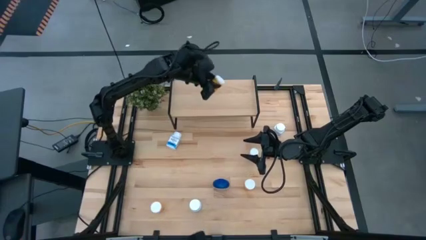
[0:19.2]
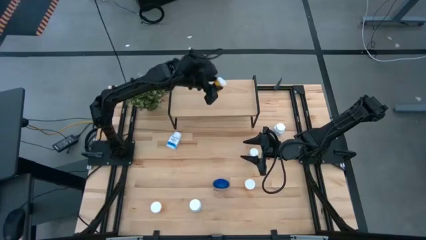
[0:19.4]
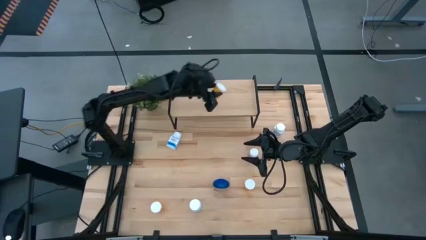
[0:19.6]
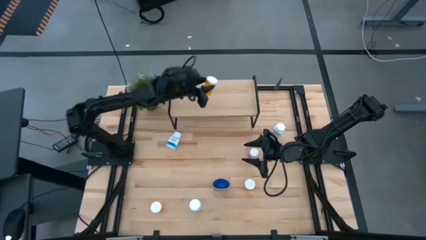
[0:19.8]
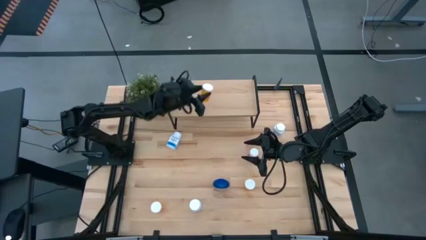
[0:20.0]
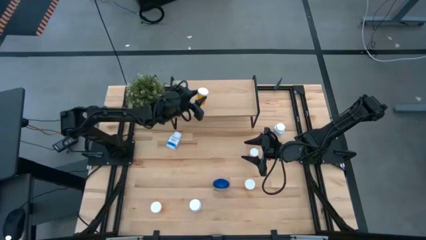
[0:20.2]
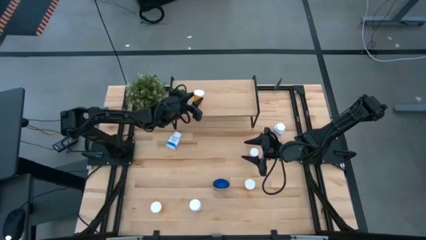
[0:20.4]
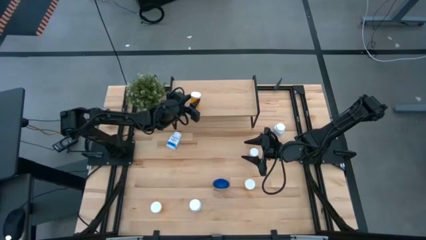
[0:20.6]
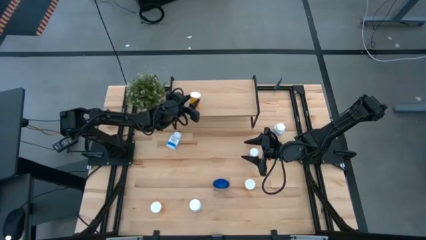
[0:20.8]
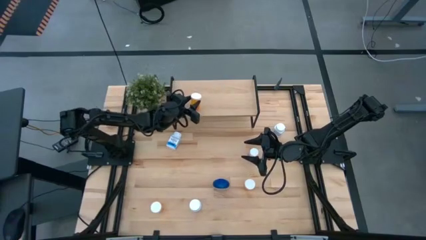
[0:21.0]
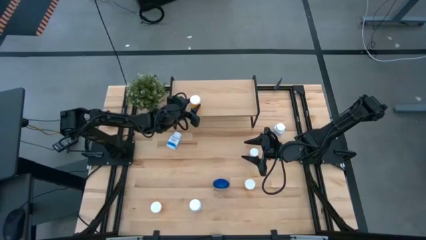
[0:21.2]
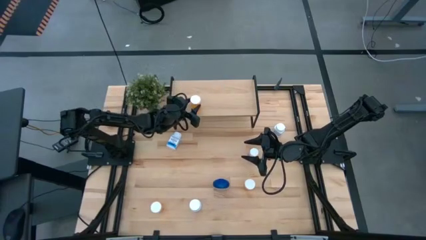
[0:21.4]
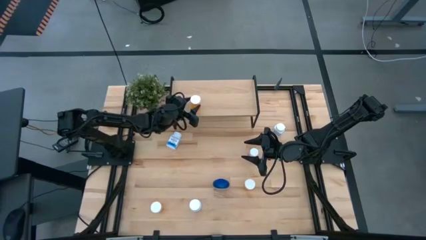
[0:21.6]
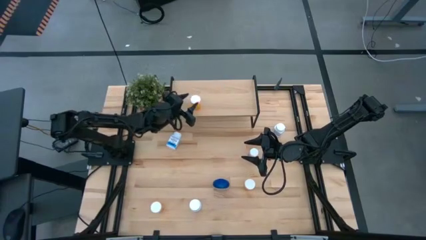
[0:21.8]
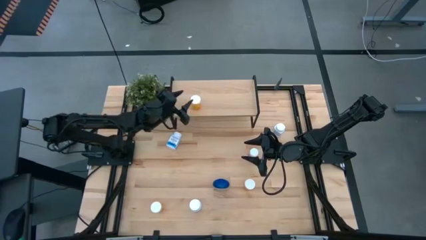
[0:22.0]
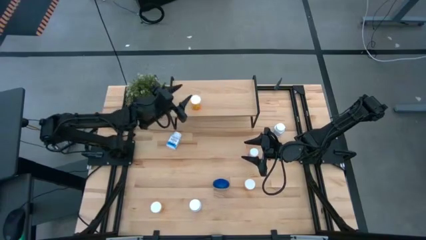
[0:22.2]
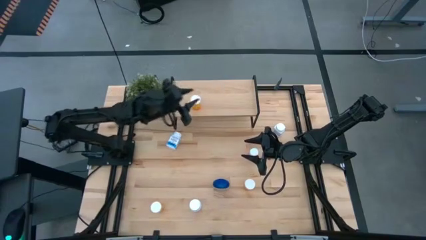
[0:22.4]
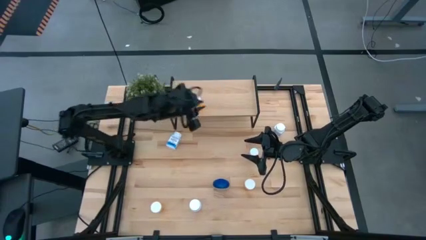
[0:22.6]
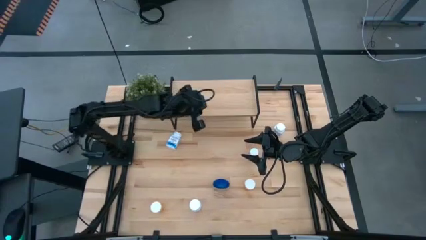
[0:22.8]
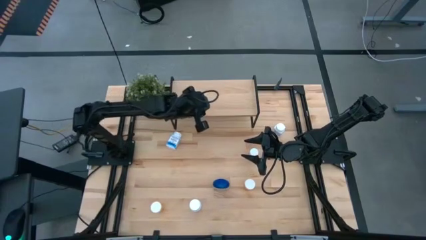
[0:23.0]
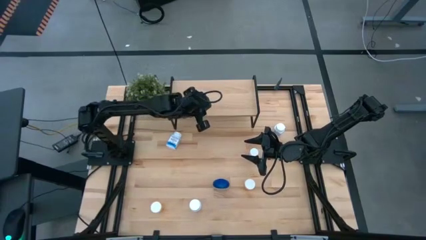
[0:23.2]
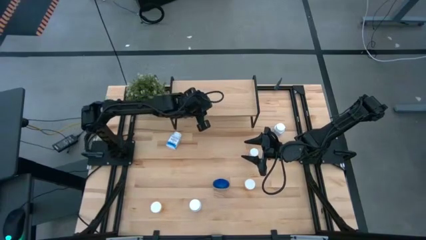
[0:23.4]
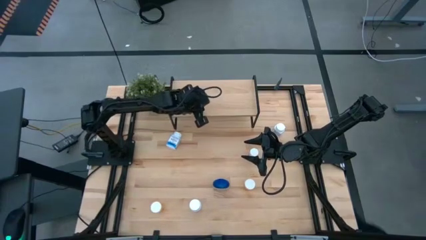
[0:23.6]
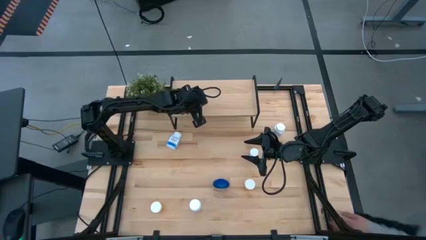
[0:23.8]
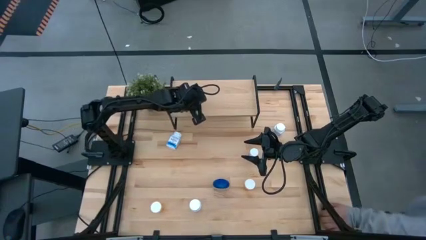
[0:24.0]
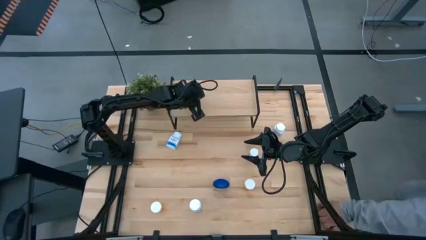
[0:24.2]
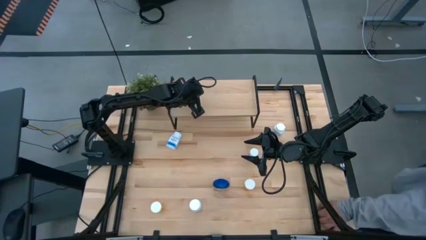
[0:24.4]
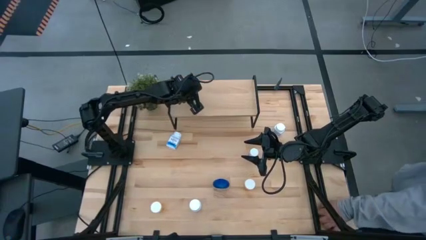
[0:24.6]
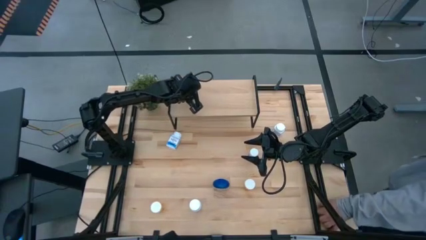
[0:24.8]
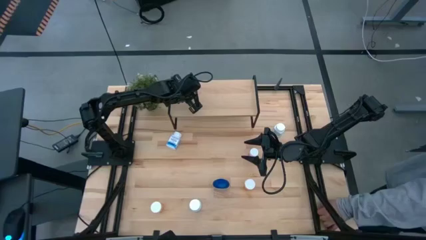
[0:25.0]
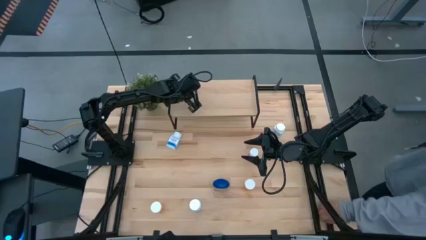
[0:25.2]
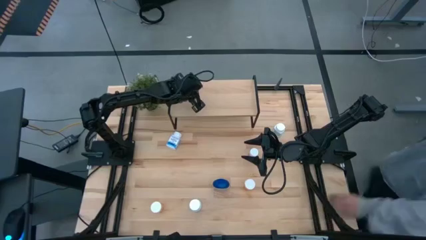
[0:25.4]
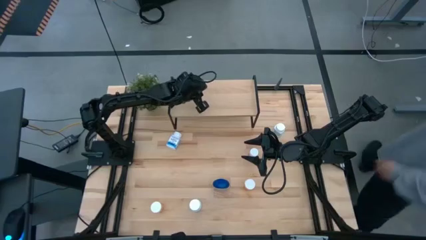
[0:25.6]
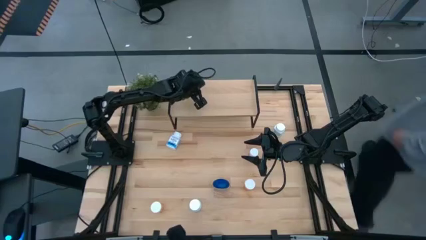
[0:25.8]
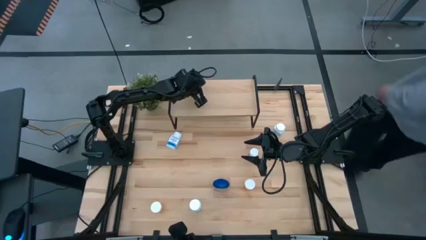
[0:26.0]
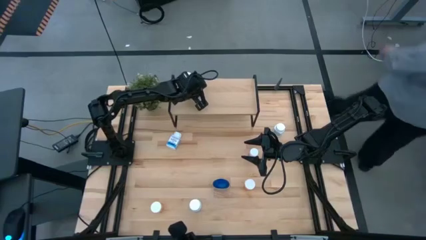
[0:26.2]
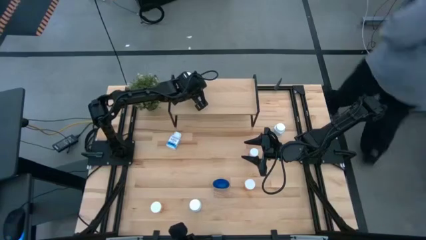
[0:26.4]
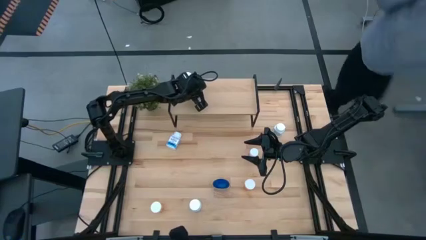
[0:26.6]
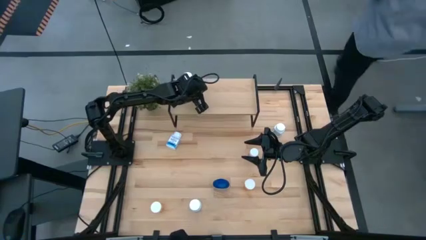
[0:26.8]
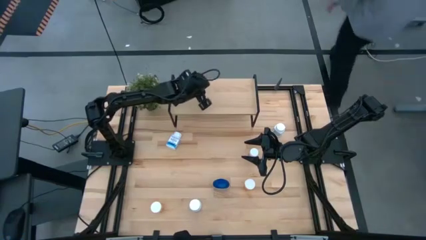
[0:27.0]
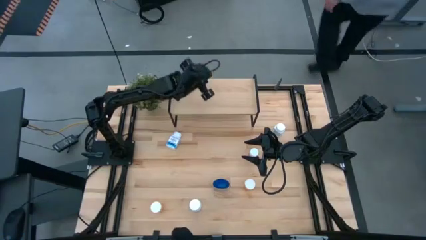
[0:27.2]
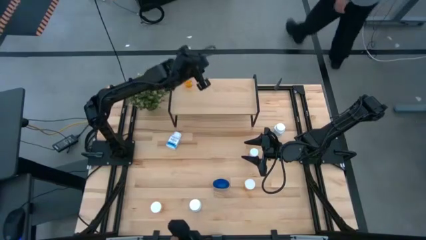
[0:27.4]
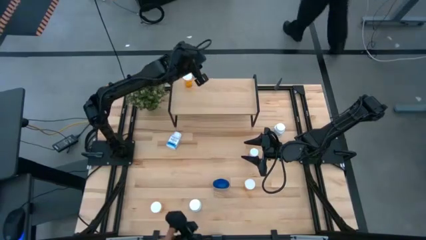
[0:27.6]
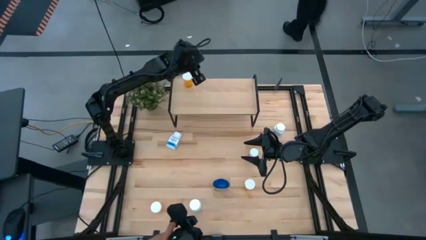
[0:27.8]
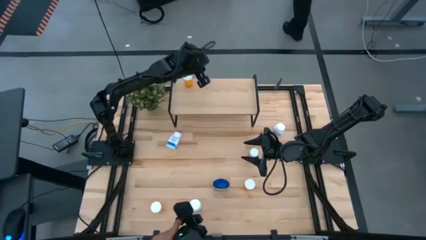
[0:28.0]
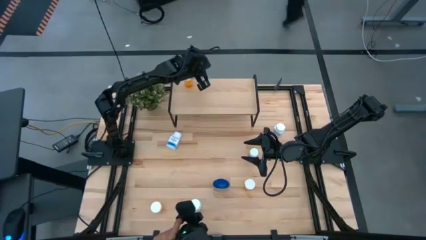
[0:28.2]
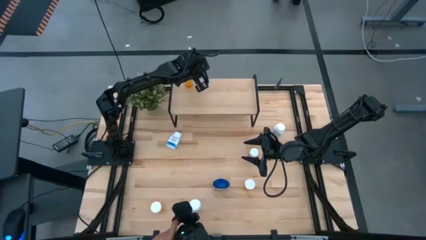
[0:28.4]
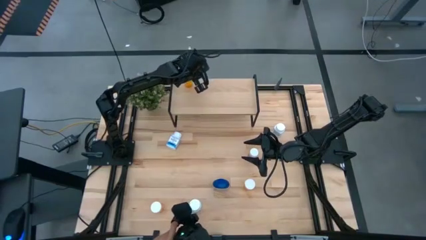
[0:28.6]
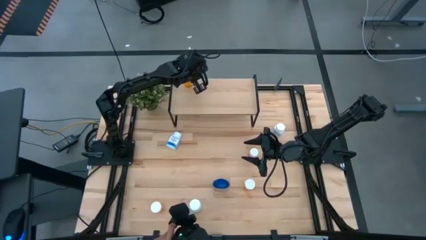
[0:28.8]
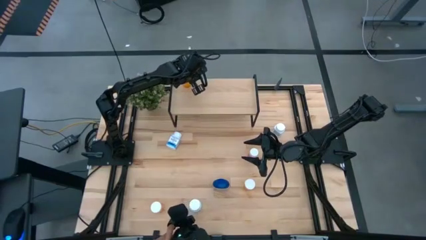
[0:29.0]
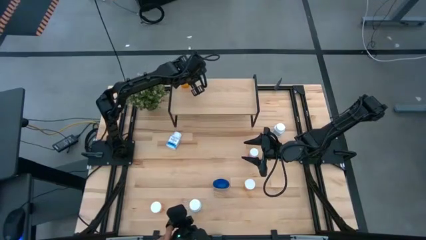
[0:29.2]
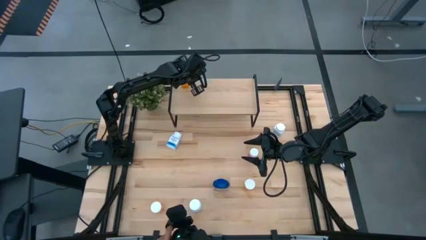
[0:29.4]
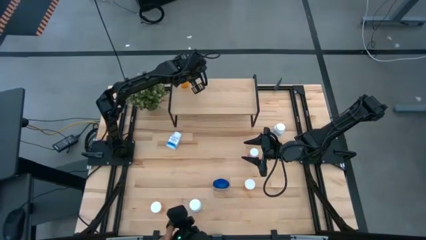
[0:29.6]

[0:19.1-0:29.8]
Task: Pick and place medicine bottles onto shelf by color
Put the top orange pill bottle on the shelf

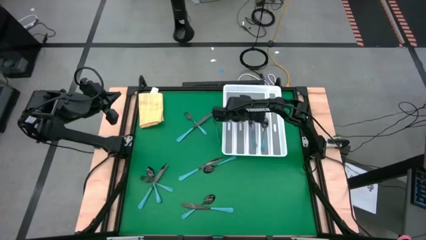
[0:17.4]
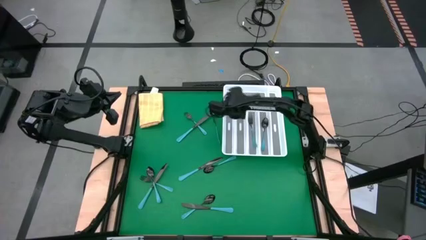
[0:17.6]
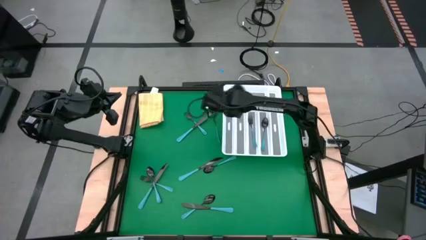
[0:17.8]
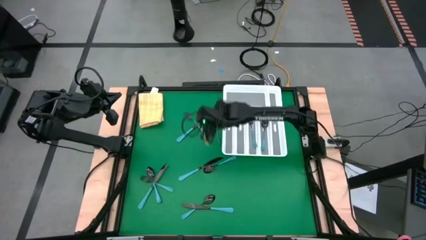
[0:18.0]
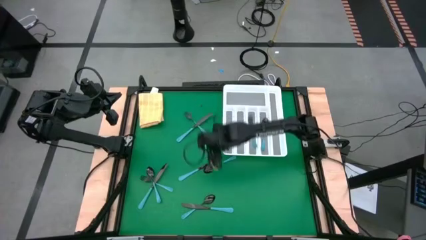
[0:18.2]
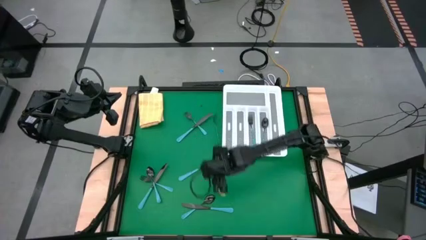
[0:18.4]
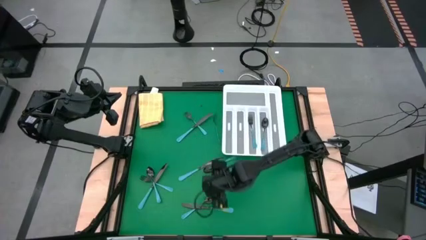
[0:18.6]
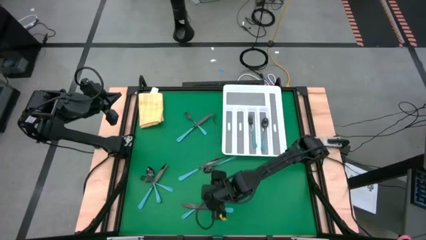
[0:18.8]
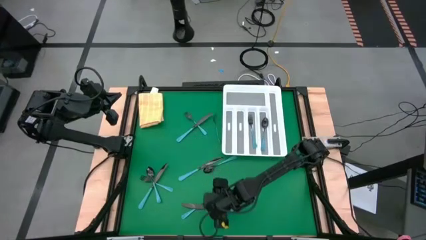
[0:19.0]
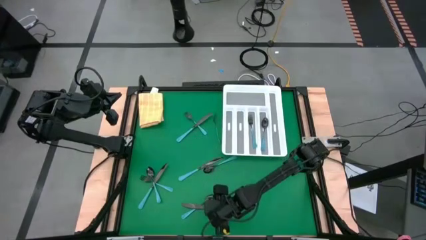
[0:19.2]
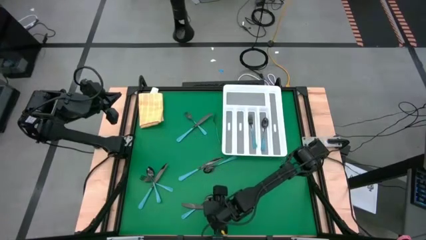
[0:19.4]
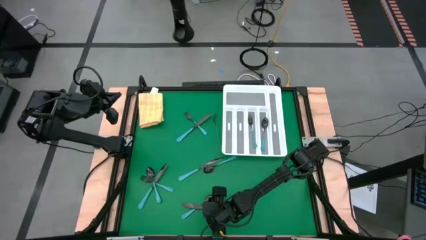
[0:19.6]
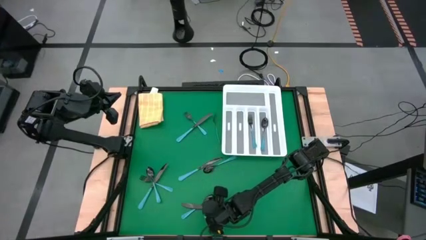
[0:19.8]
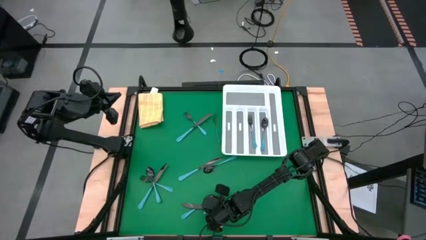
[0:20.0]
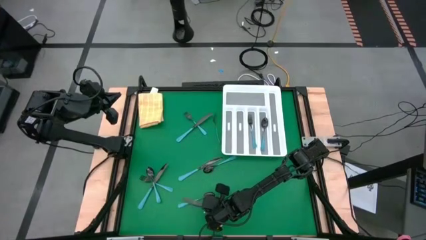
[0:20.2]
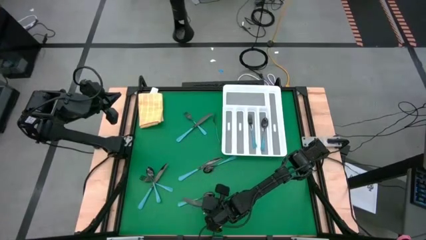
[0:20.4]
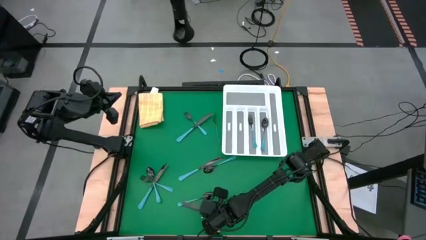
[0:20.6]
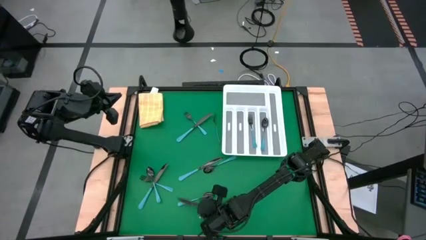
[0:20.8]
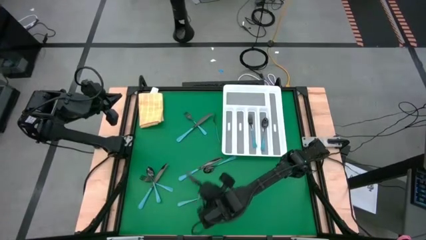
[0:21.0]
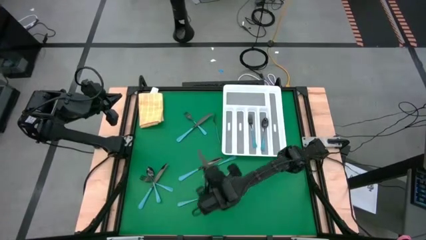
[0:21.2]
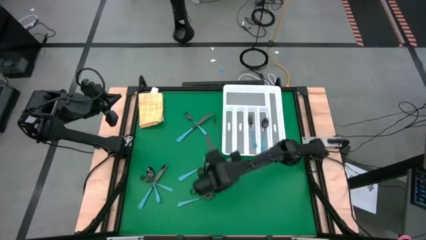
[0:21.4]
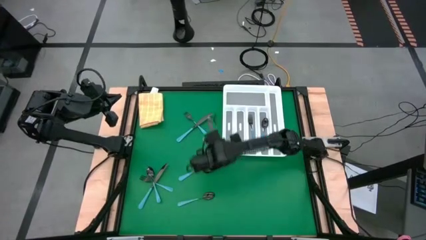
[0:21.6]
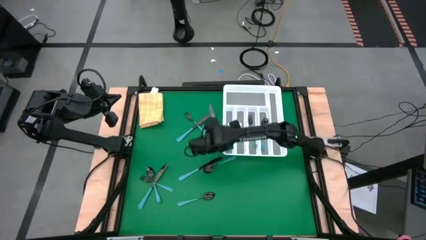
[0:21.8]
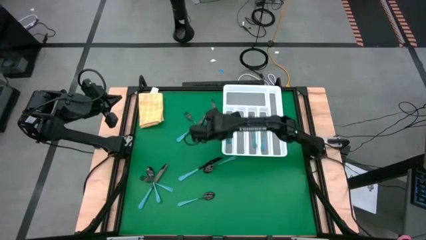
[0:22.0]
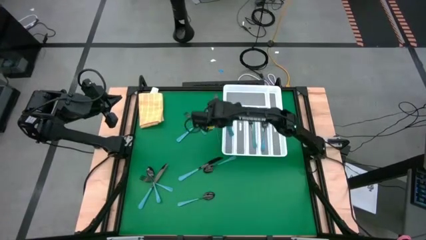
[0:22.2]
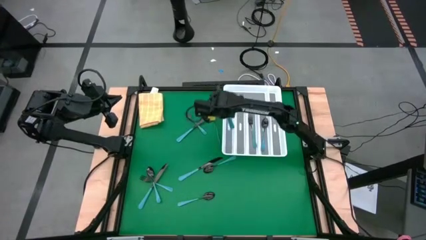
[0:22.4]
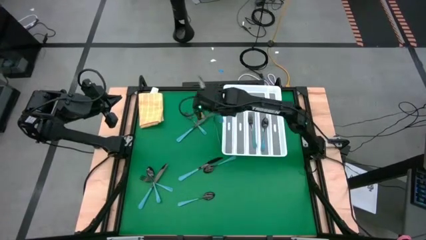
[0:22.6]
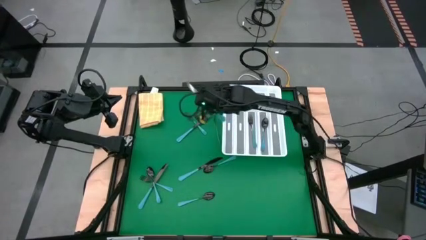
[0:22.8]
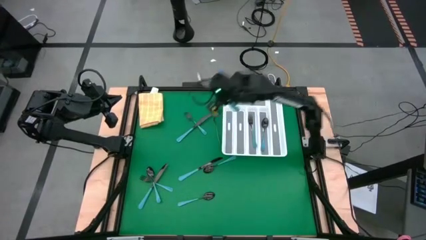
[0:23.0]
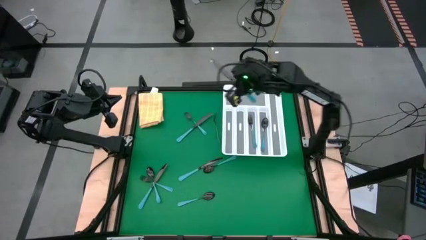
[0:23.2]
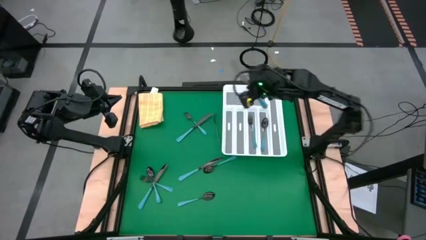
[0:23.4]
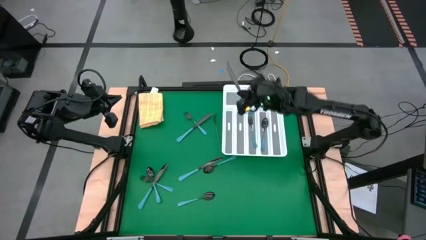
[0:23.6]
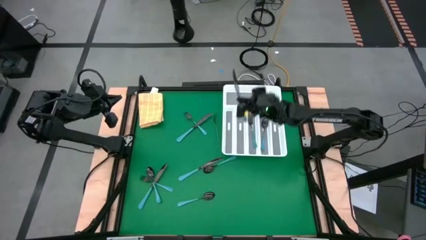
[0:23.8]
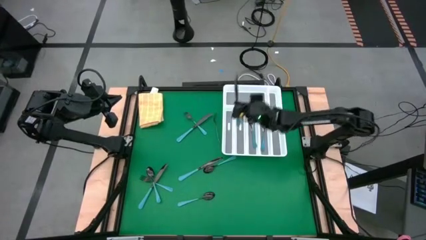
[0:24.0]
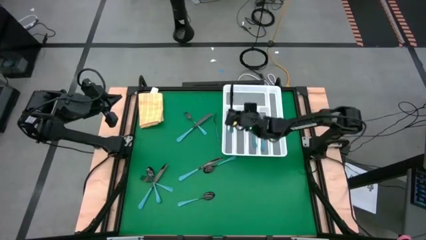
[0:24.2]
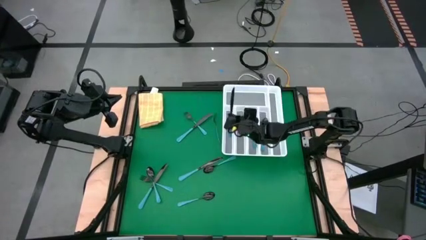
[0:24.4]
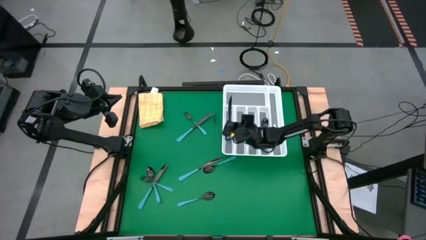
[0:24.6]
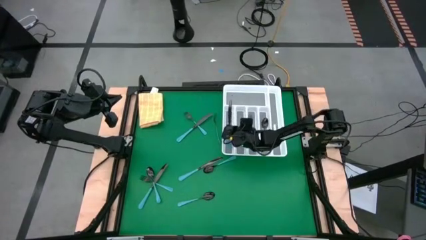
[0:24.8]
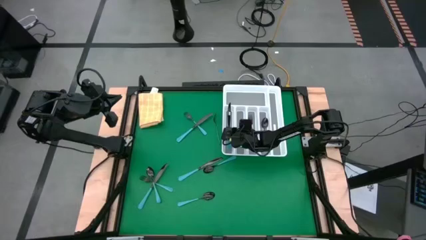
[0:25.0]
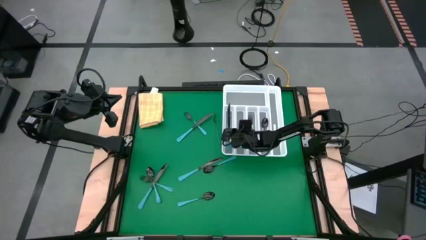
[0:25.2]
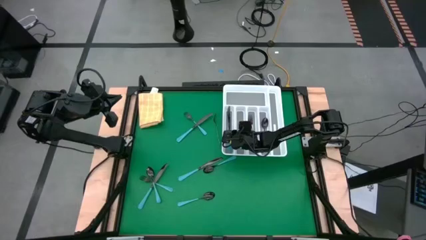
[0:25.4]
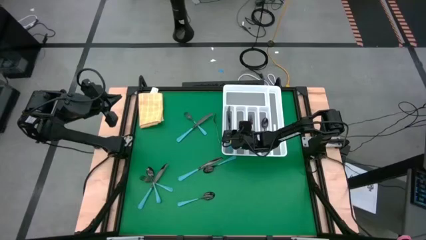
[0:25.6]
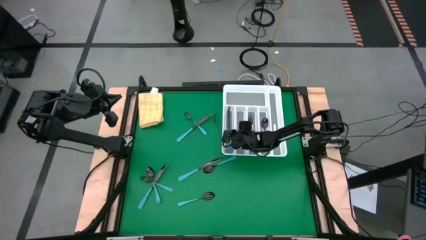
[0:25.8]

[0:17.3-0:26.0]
Task: Sort silverware
Put the blue knife into the white cutlery tray
